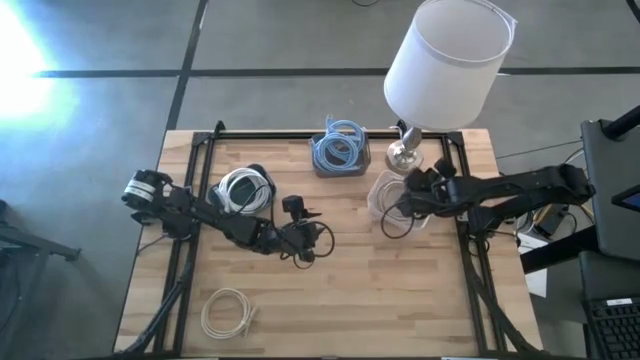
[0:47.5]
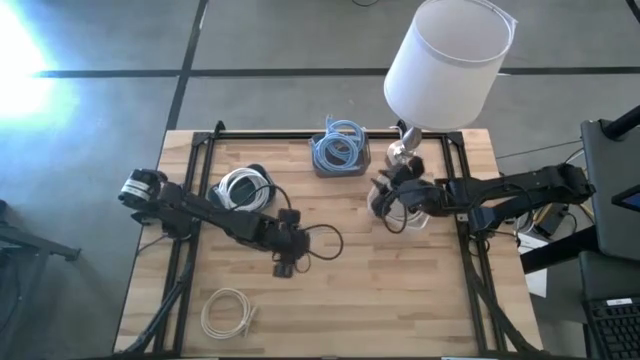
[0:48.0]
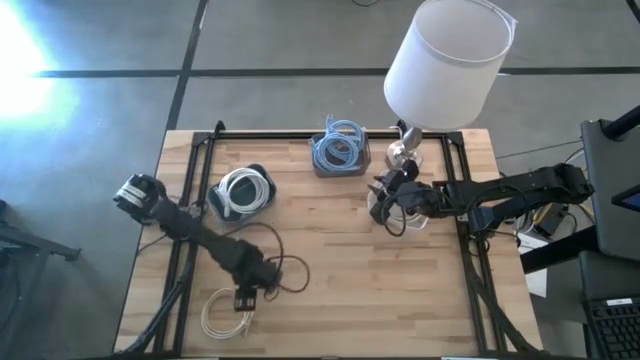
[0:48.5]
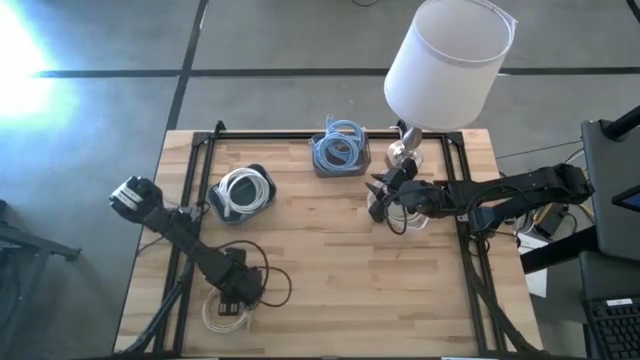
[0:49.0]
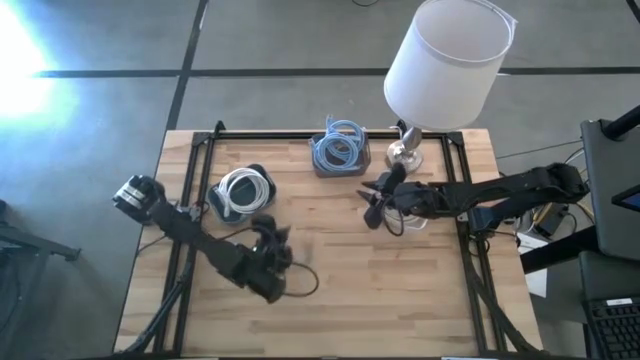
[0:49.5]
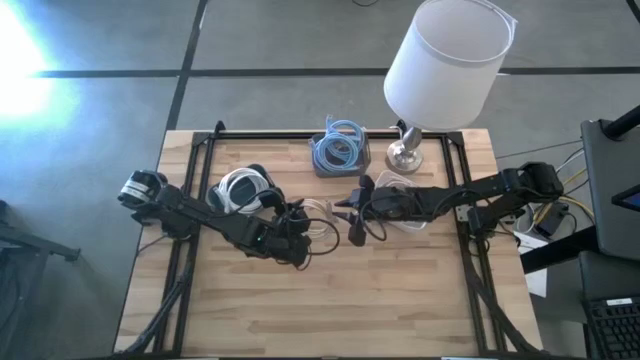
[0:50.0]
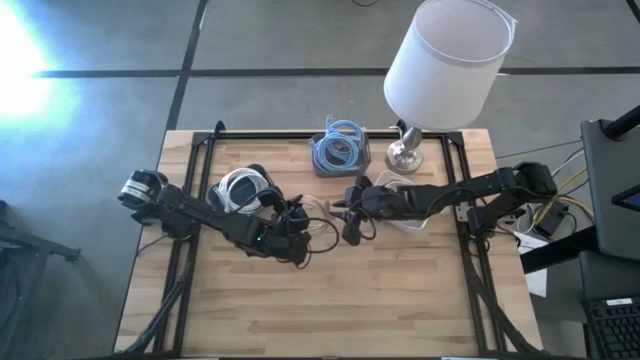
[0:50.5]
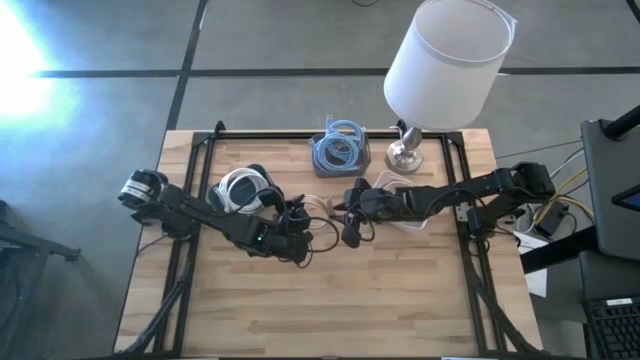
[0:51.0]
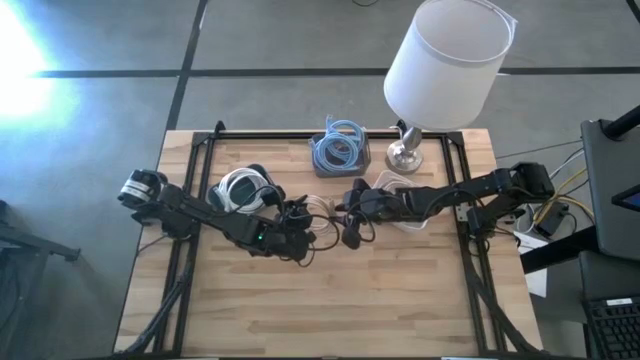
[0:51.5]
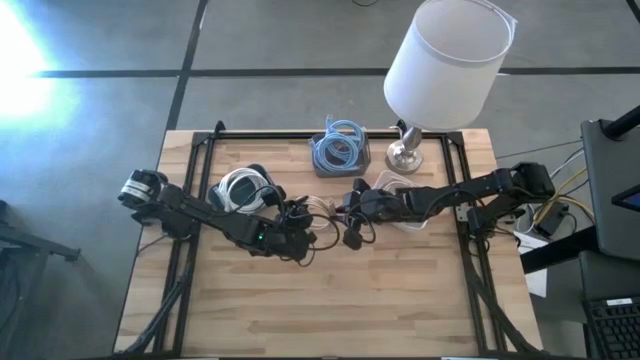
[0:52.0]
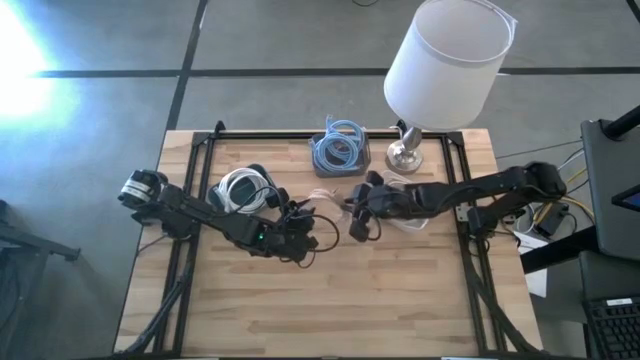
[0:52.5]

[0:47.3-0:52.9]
Task: Sort HDMI cables
Put the light brown HDMI cable into the white bin

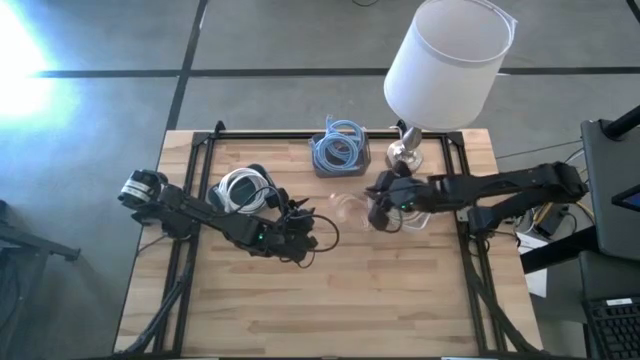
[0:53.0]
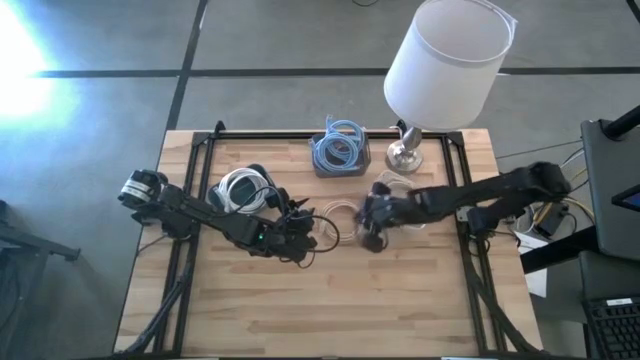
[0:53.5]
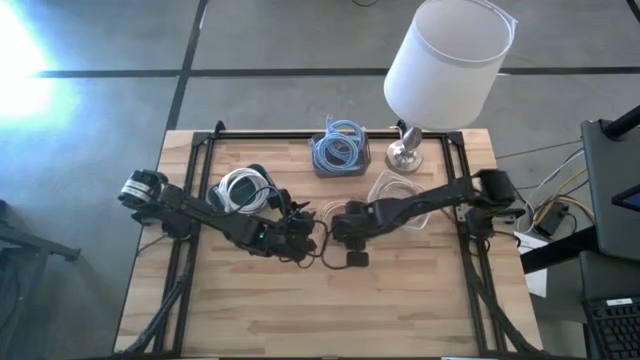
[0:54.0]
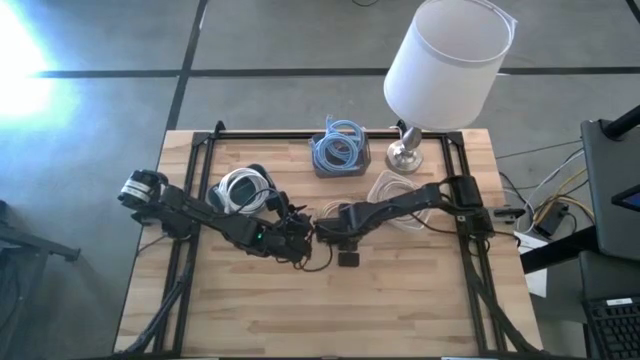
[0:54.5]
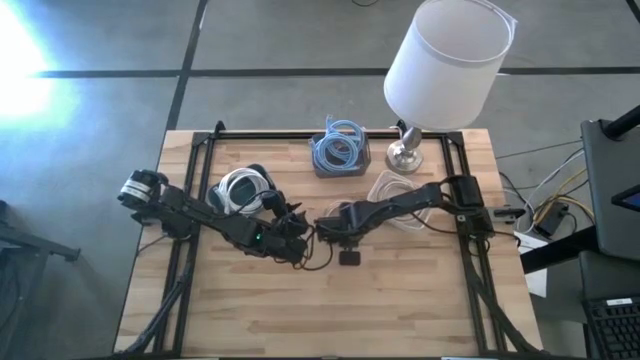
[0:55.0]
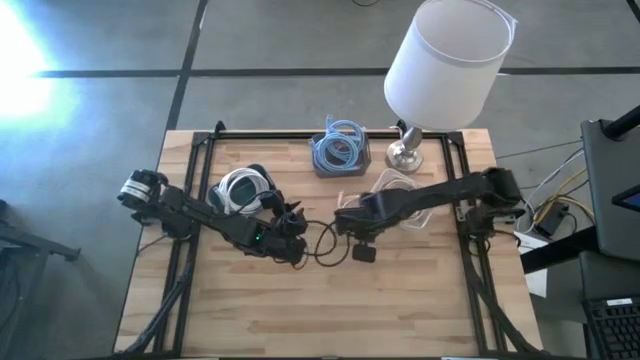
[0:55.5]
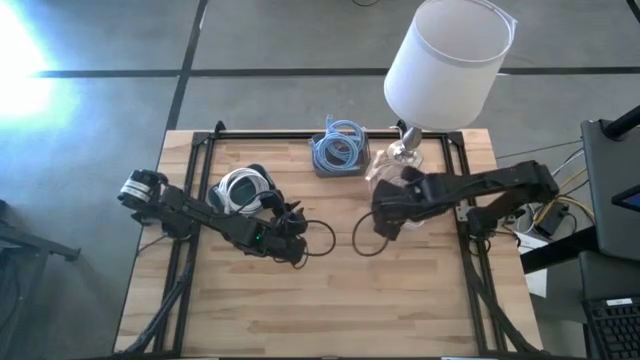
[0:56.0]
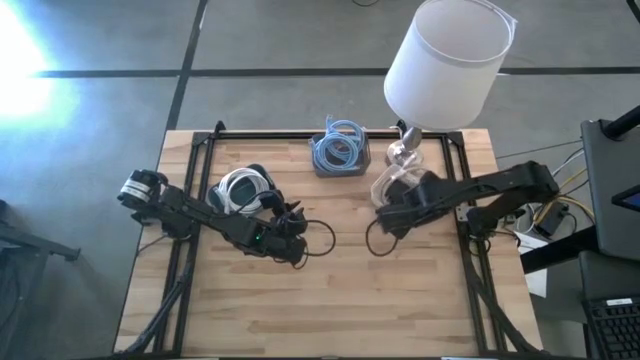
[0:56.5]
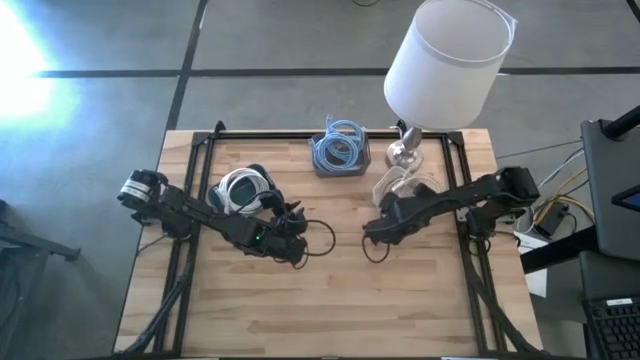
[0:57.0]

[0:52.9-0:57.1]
Put the light brown HDMI cable into the white bin

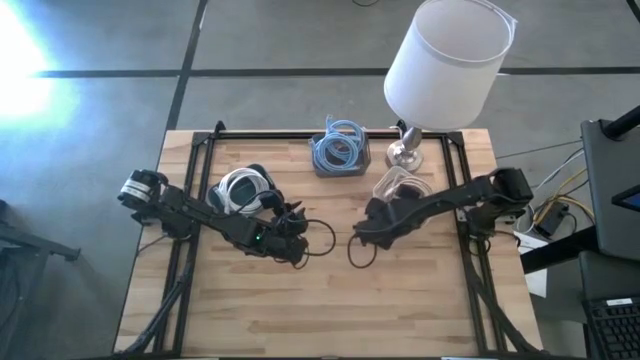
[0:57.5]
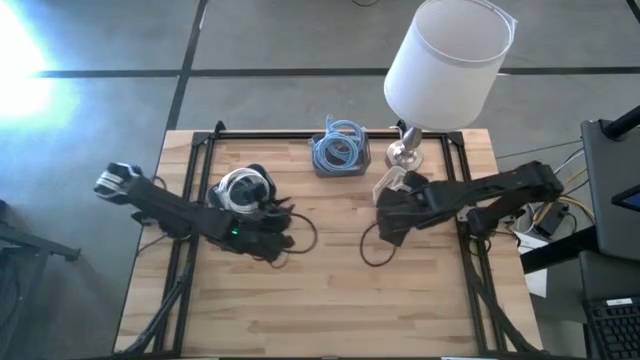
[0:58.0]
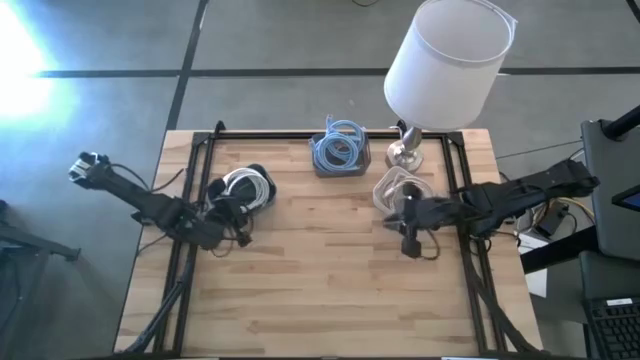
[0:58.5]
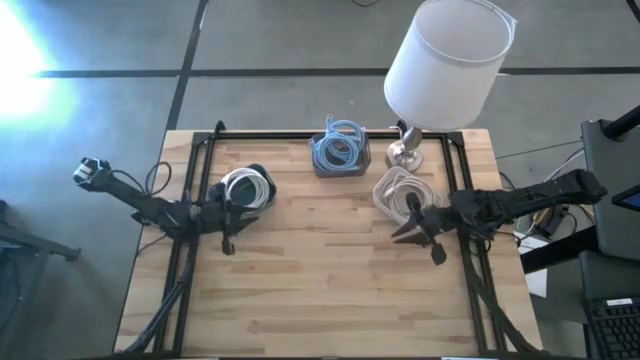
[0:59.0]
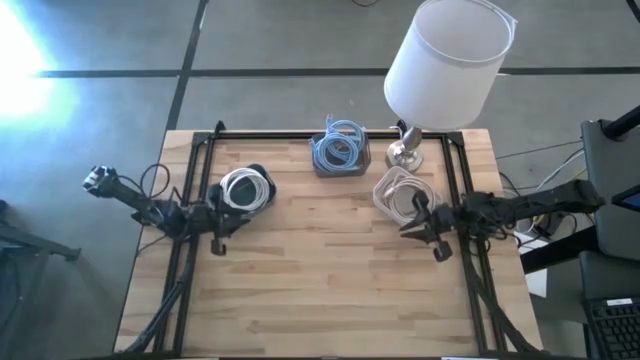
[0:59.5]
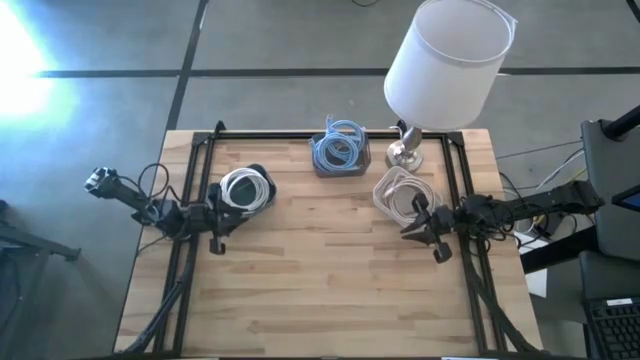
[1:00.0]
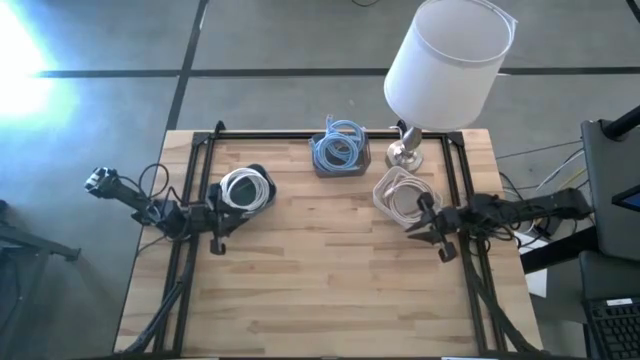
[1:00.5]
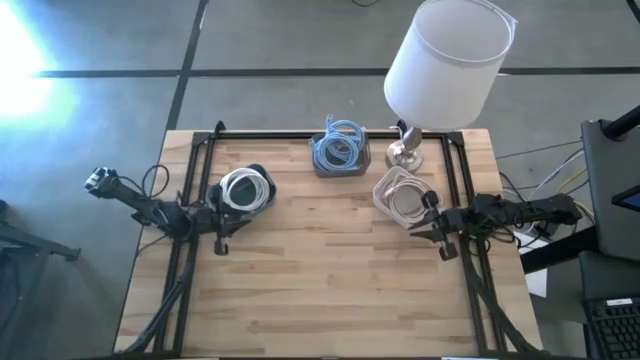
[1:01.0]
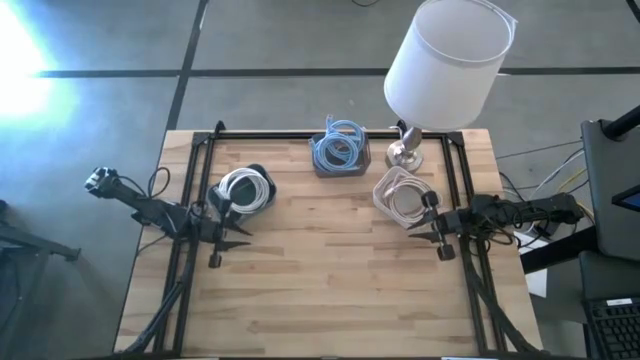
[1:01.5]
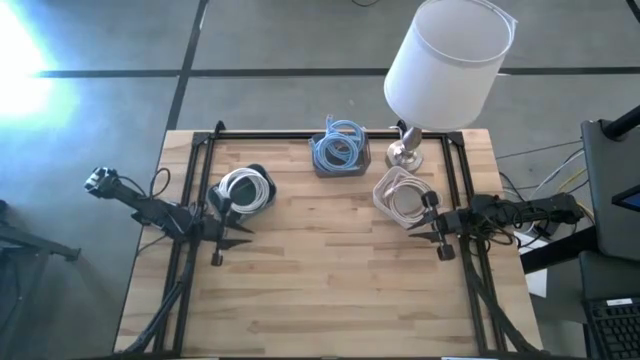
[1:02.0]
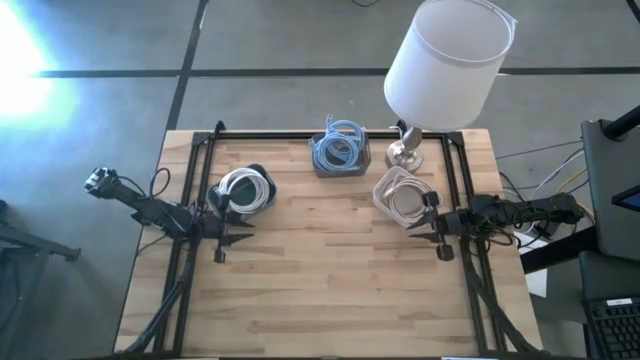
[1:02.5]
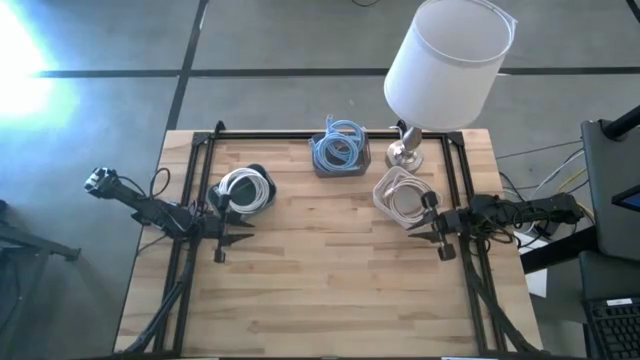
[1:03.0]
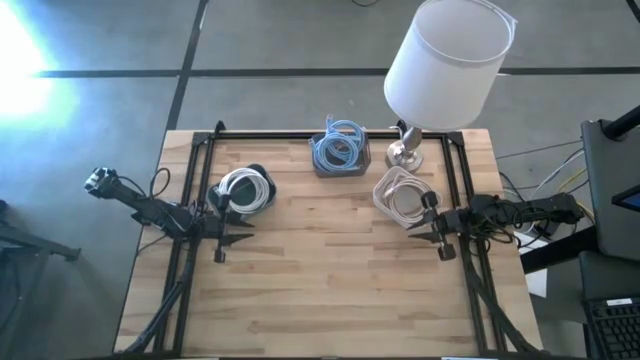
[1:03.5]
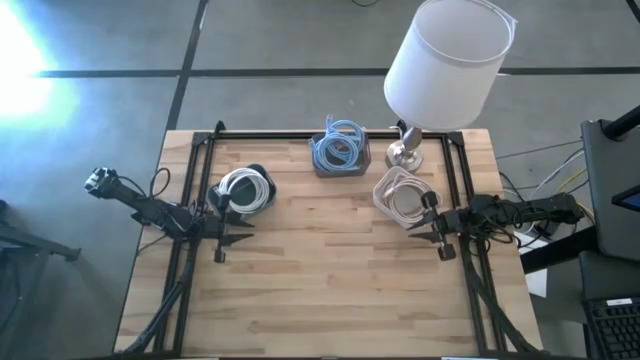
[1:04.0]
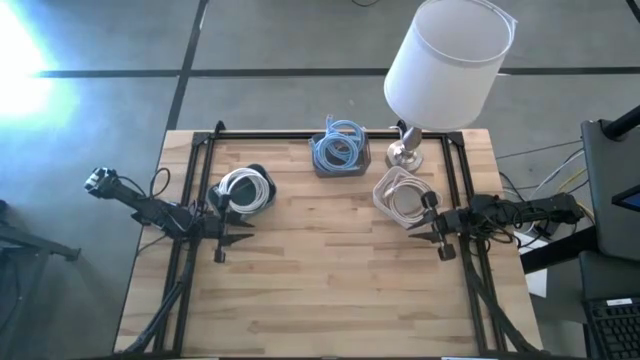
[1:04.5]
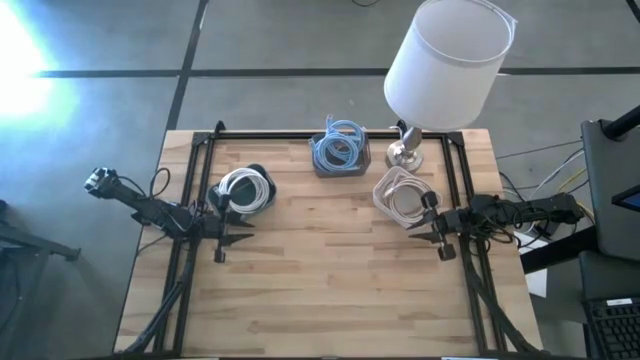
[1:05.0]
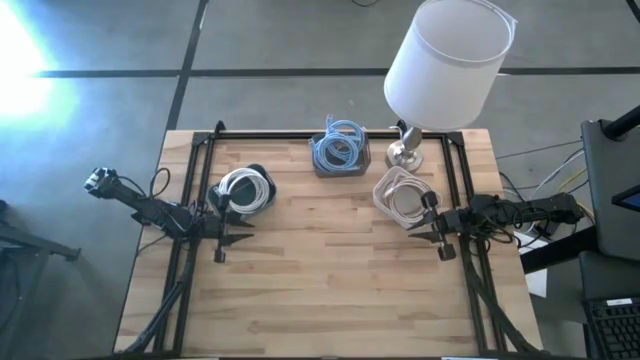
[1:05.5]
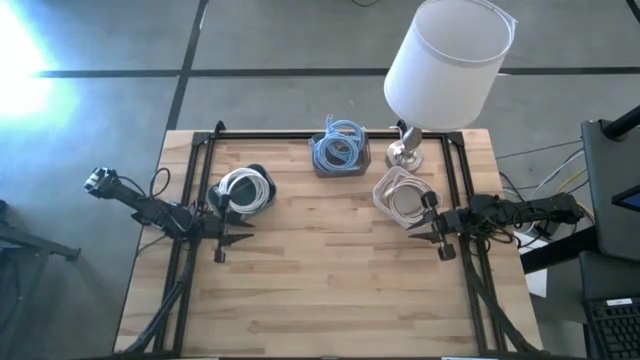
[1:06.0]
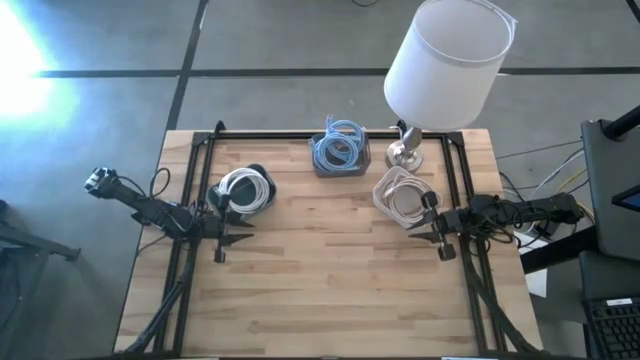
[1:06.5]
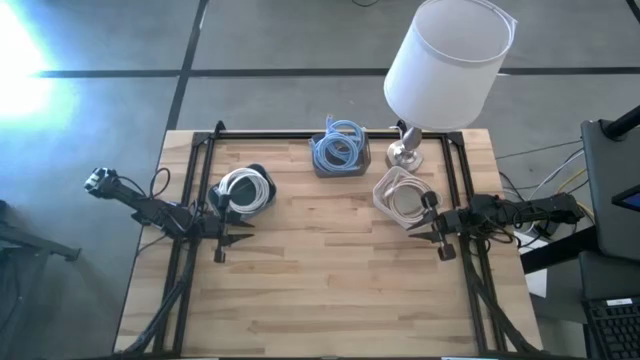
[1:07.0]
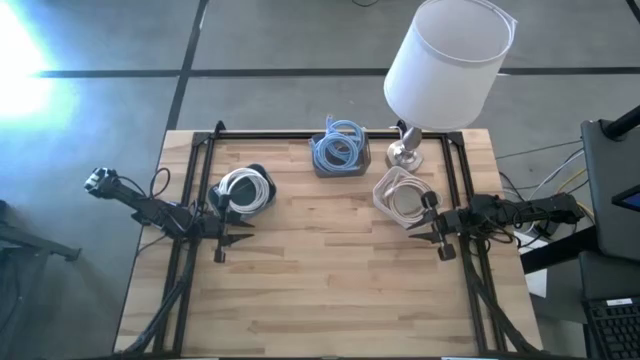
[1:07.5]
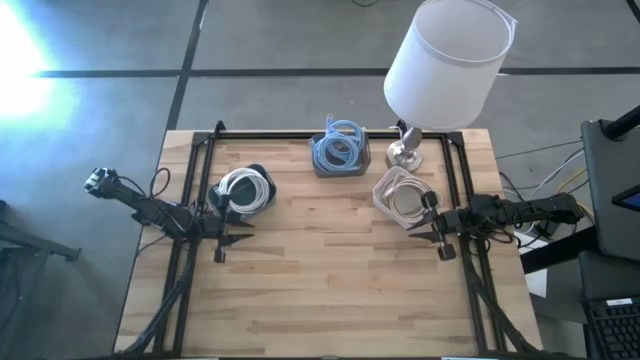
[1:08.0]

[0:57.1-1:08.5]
Return to Home Position
